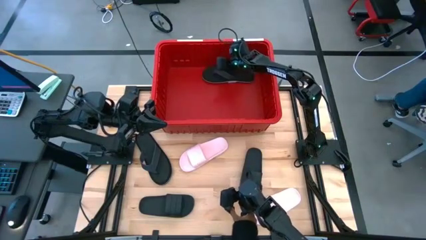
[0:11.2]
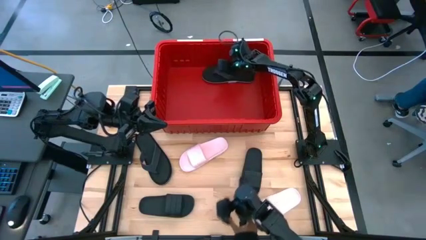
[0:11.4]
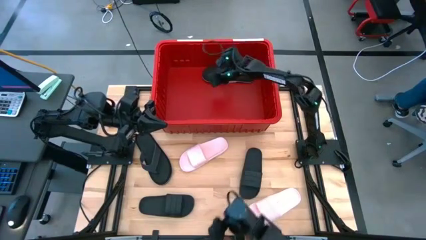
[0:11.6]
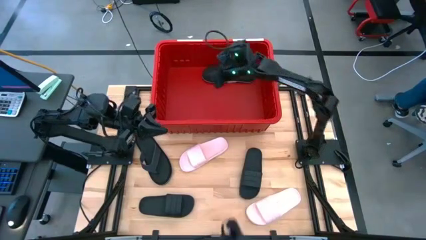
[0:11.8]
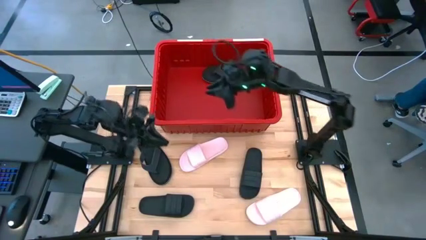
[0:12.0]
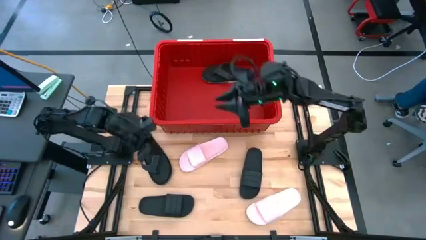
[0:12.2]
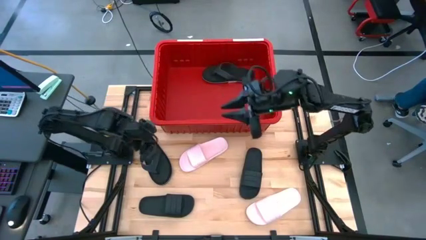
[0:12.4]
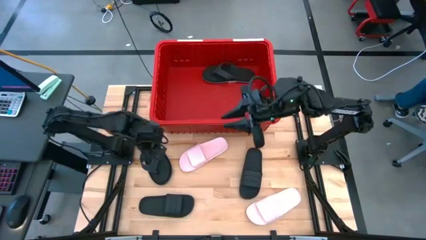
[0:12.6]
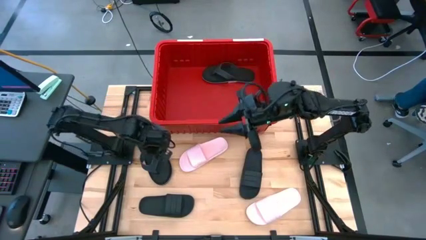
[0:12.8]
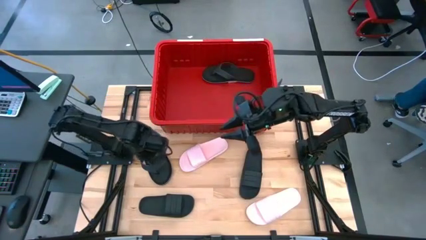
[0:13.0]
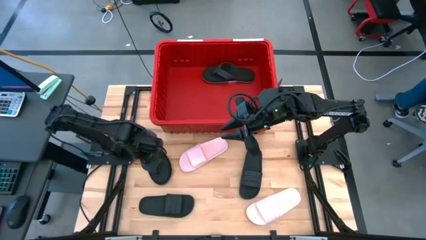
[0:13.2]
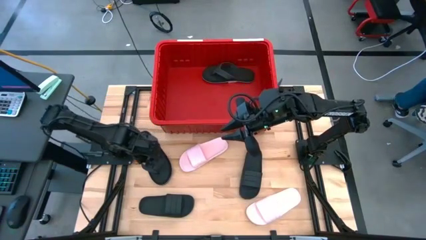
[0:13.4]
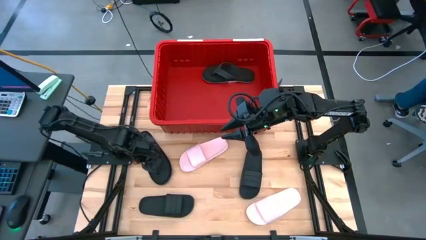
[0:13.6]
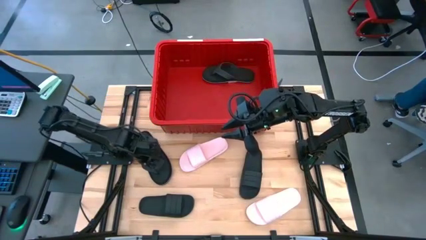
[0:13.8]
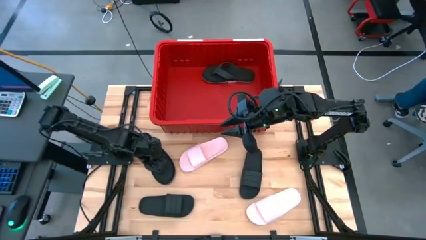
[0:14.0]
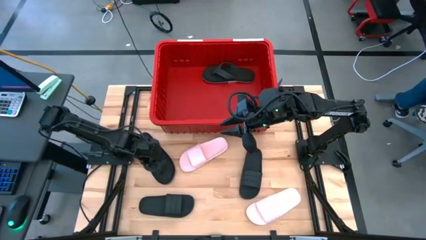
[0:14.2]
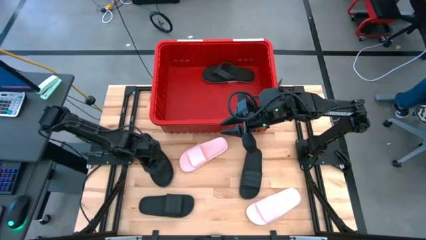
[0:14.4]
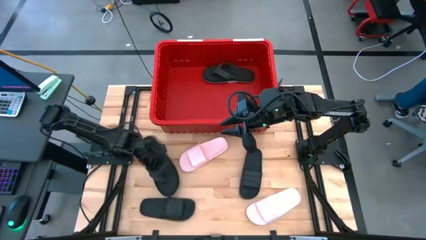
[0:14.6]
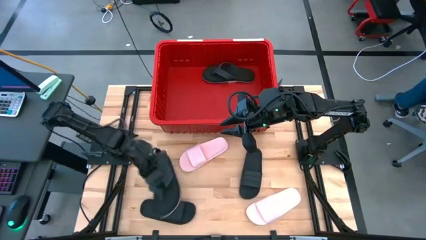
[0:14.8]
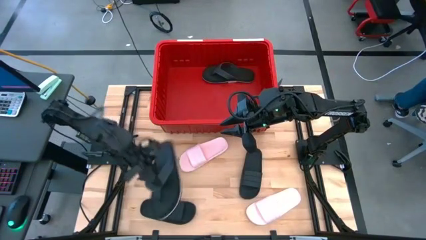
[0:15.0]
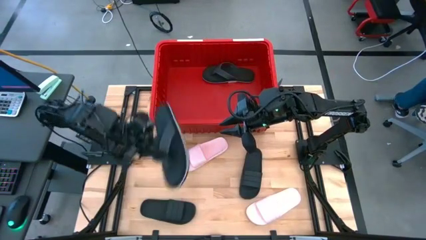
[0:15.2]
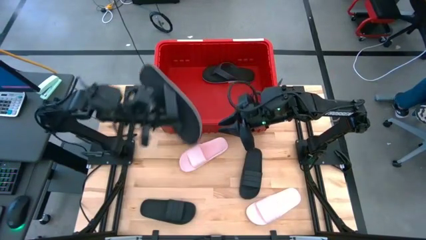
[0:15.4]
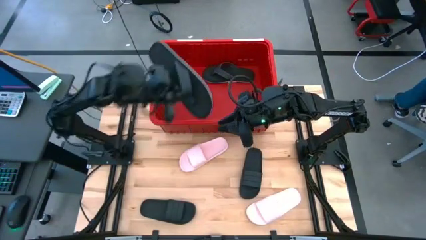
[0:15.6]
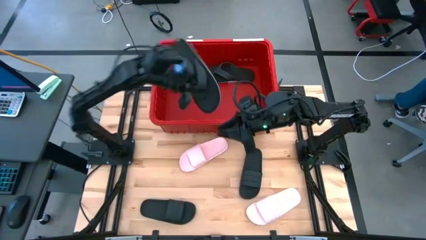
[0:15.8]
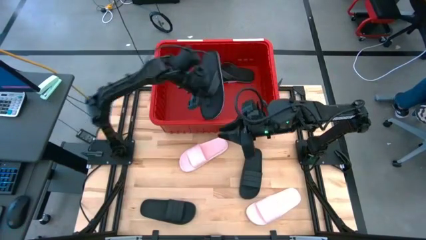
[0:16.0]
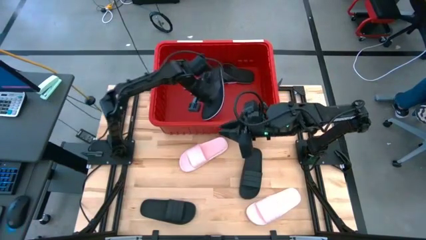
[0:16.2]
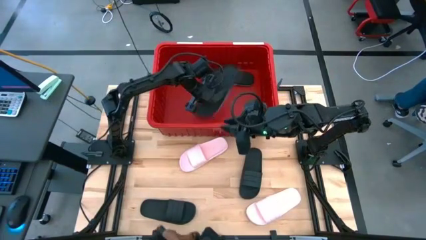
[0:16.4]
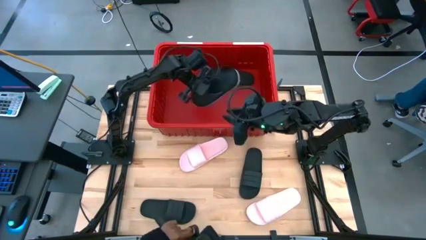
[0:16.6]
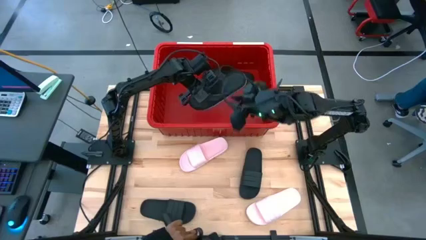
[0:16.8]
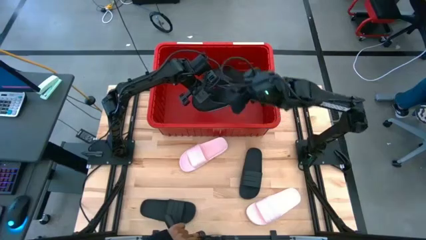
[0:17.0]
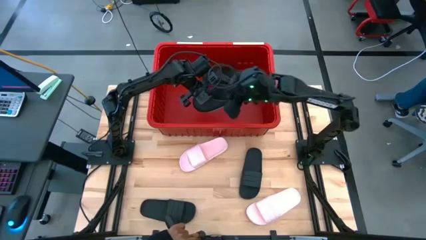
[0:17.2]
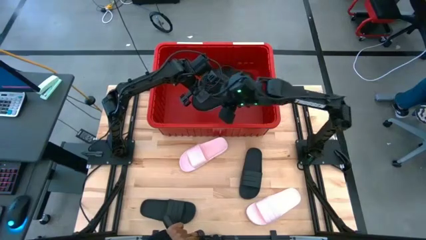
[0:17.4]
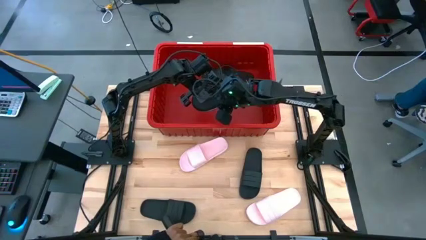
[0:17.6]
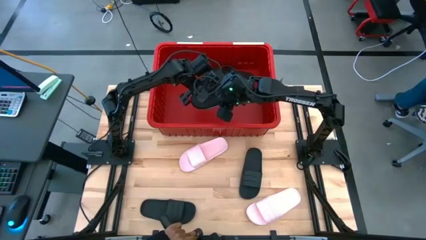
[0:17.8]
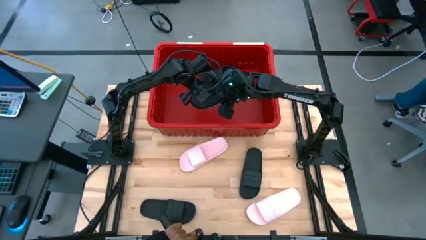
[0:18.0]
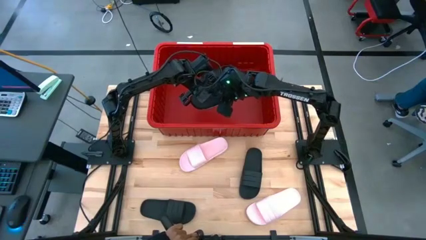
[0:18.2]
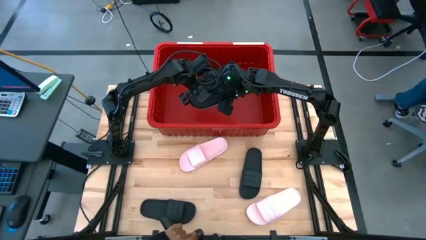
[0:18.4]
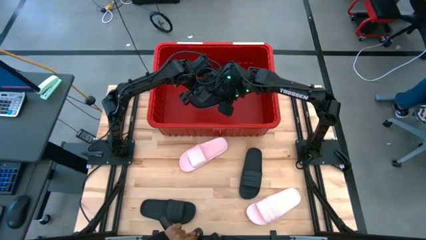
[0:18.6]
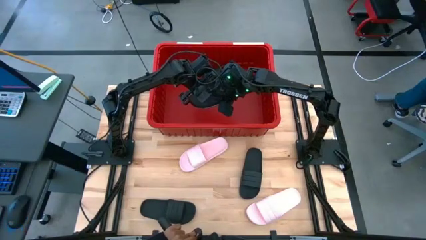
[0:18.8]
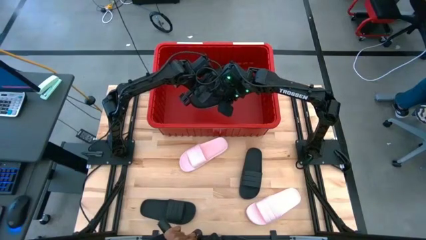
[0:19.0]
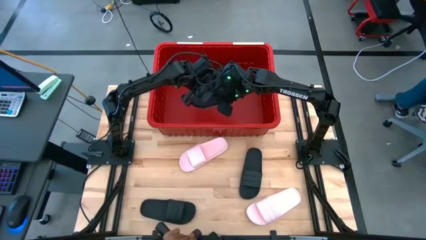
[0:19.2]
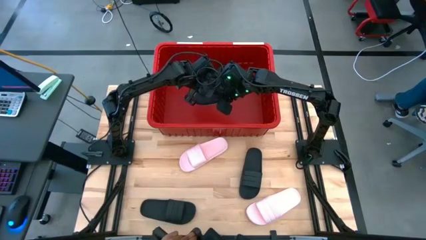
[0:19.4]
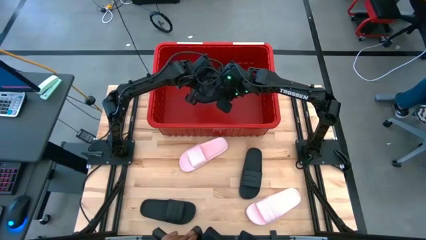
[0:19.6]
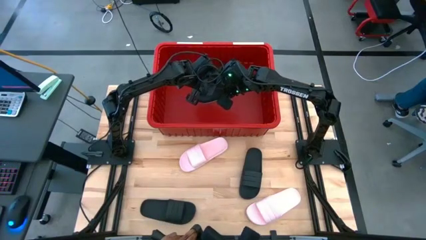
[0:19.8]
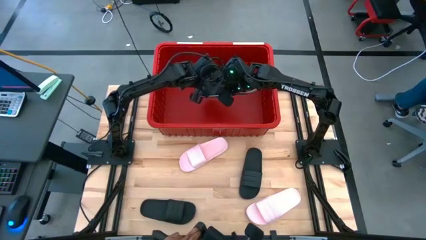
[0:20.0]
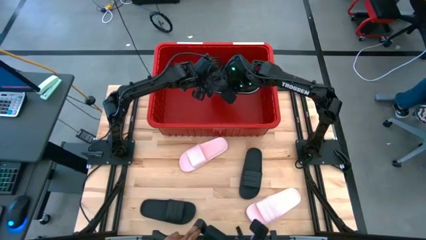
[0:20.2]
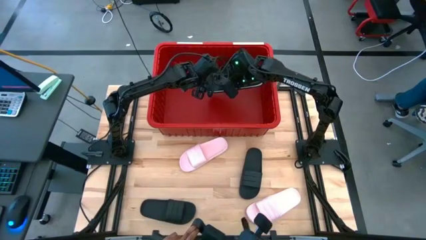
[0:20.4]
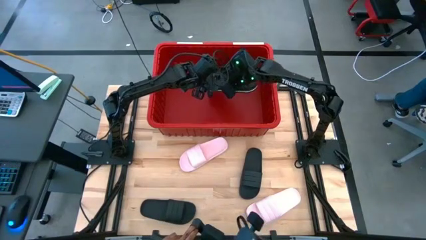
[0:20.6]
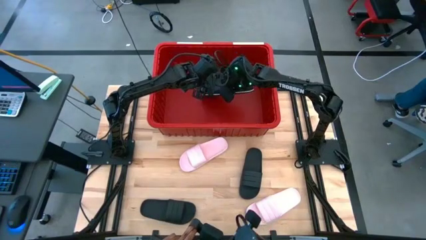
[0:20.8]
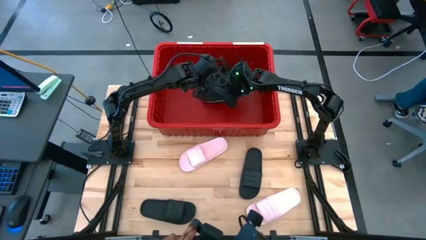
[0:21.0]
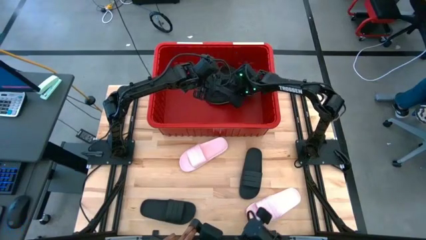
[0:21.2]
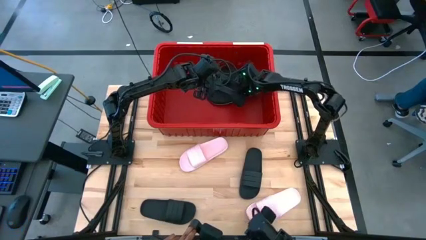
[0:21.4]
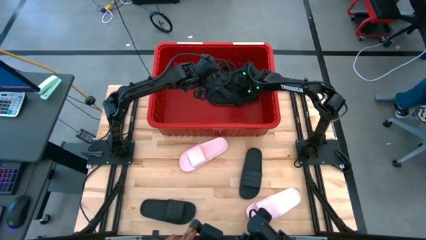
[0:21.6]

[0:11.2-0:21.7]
Task: Pick and place slides into bin
Put the black slipper into the red bin
